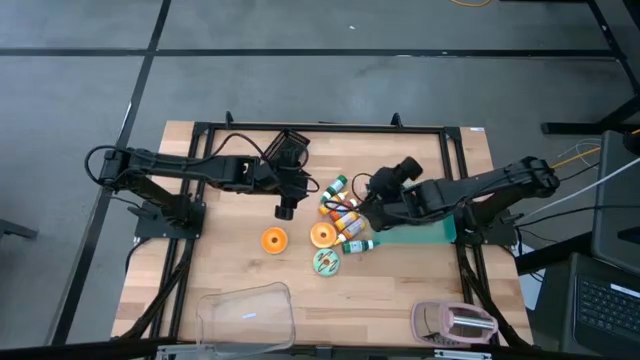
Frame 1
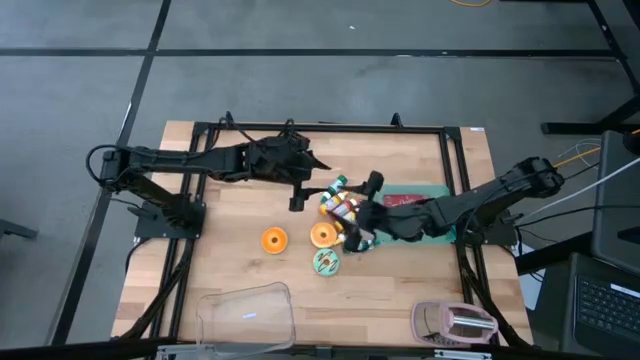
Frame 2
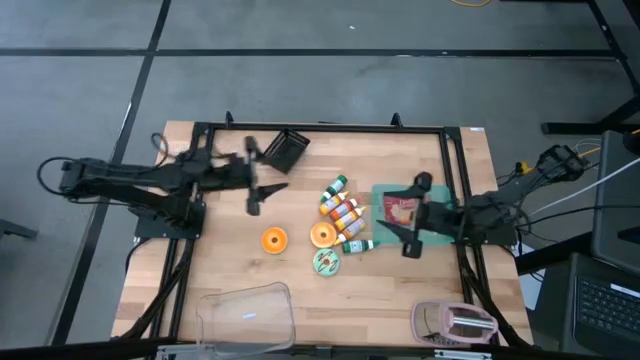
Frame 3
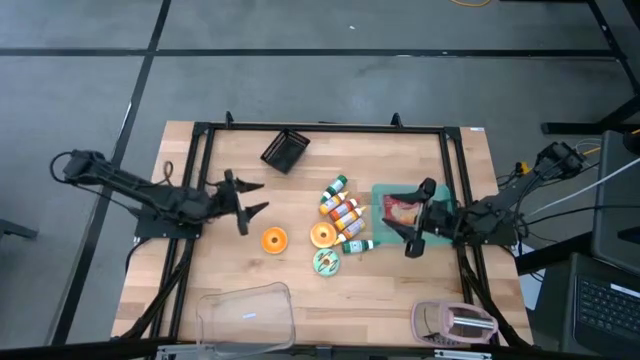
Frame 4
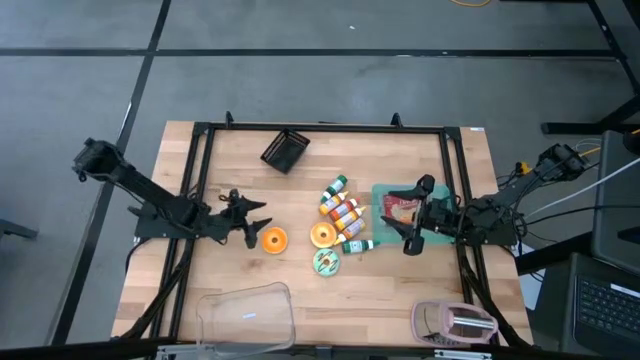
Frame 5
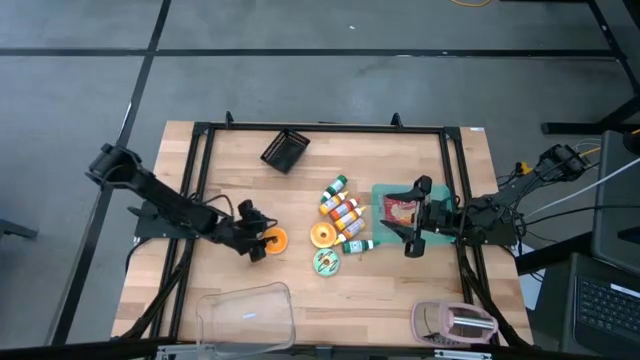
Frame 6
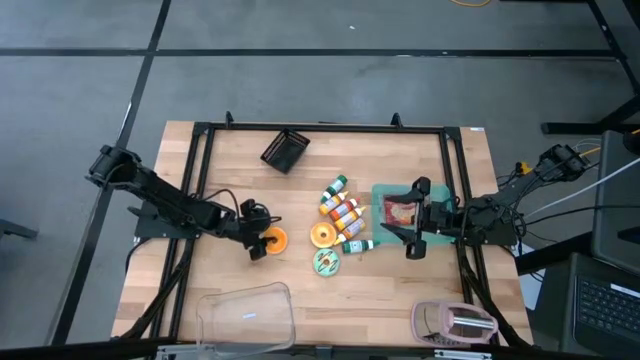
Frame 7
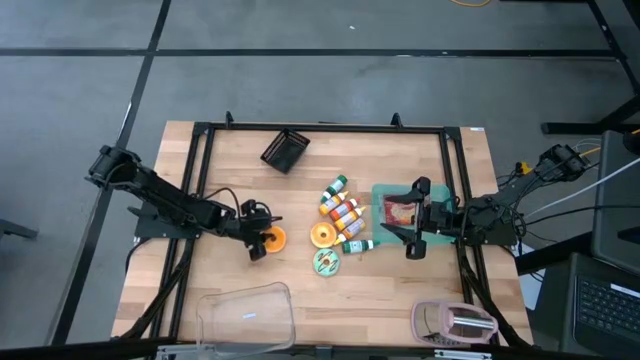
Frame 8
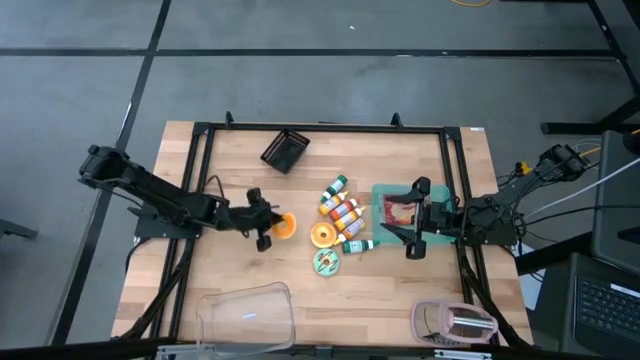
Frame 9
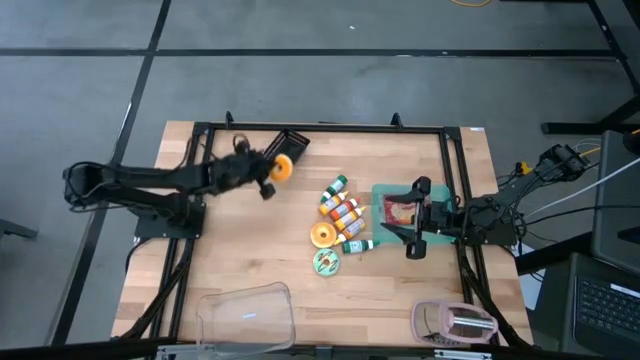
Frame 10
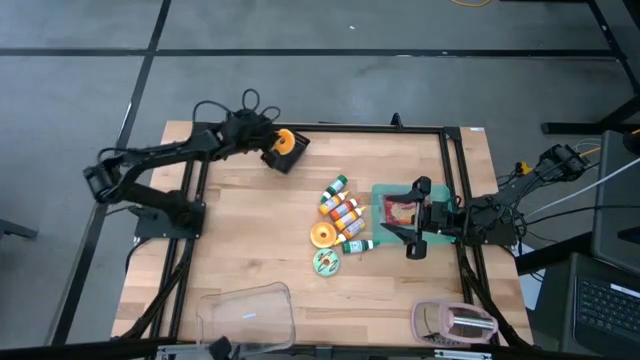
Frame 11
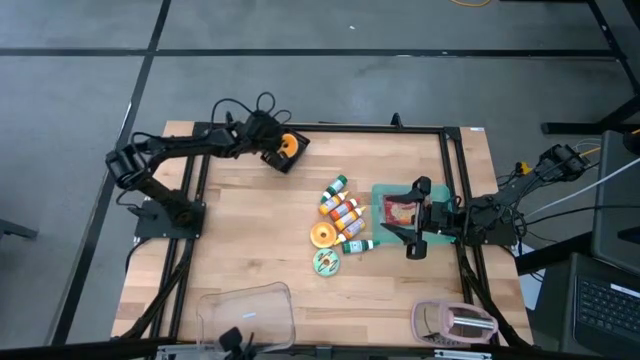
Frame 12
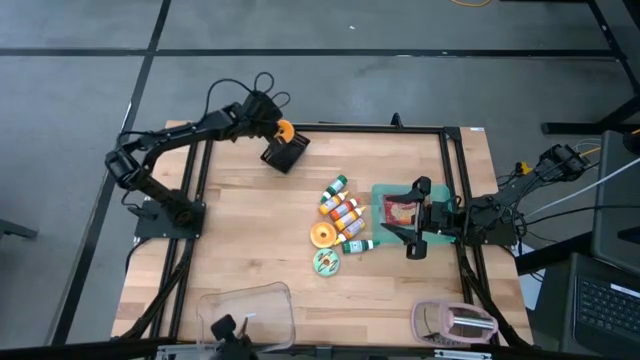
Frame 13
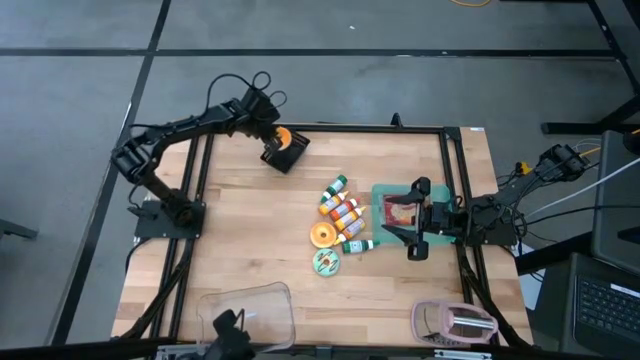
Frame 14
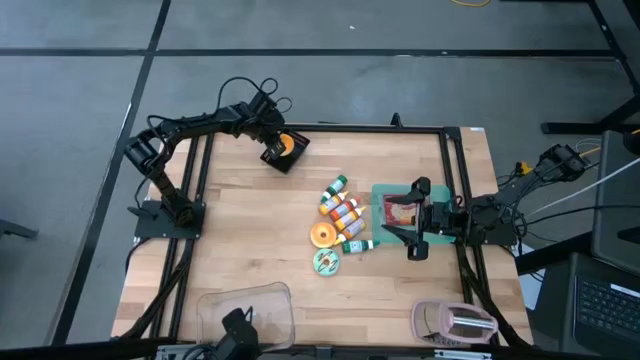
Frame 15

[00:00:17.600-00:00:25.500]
Put the left orange donut into the black bin

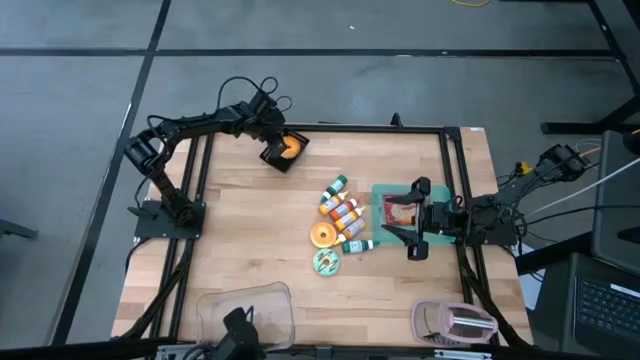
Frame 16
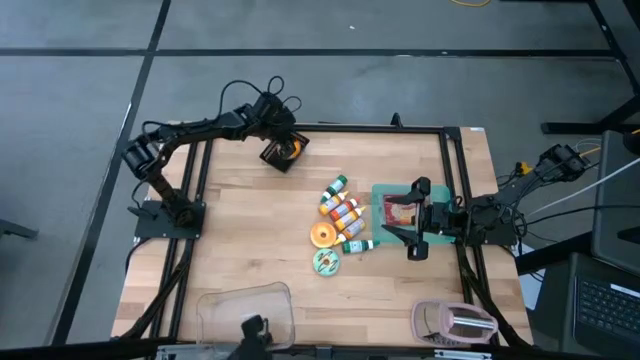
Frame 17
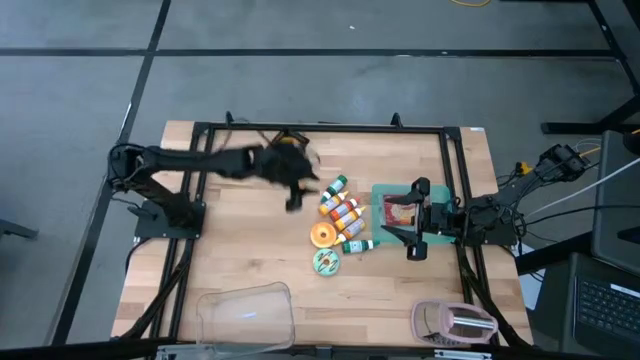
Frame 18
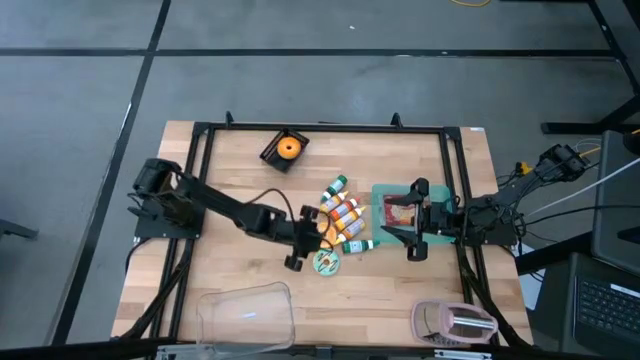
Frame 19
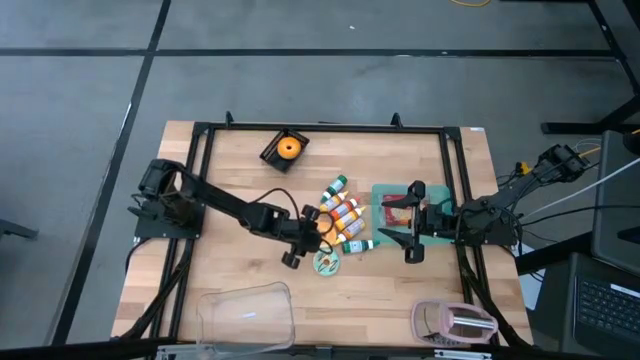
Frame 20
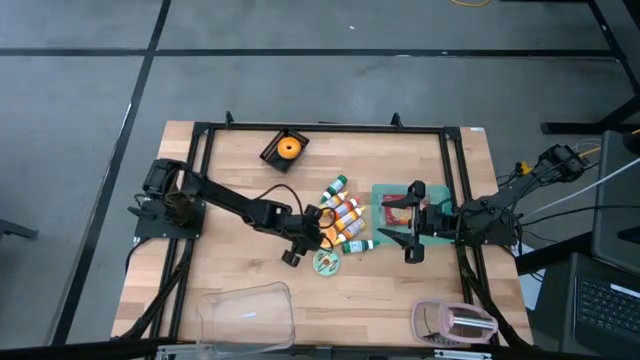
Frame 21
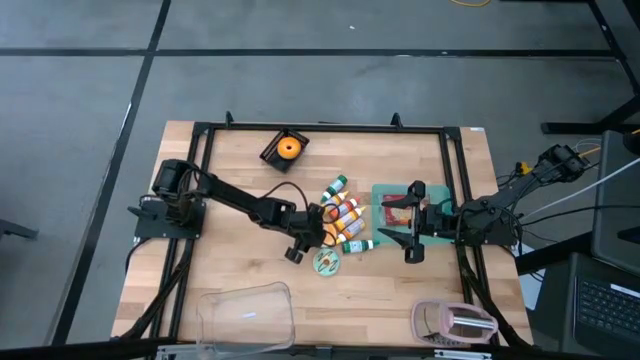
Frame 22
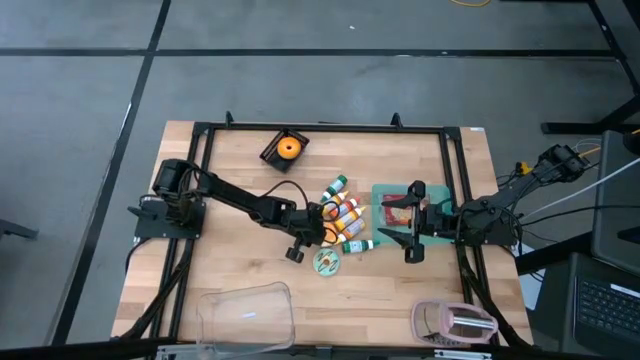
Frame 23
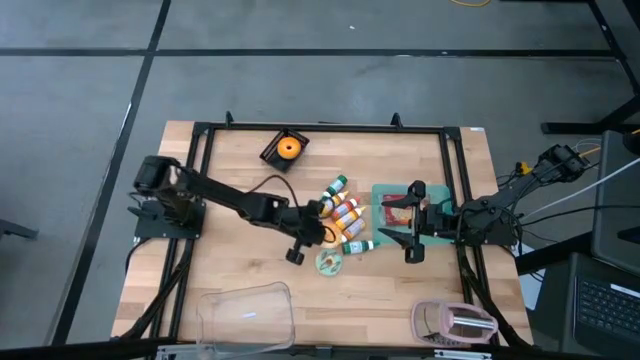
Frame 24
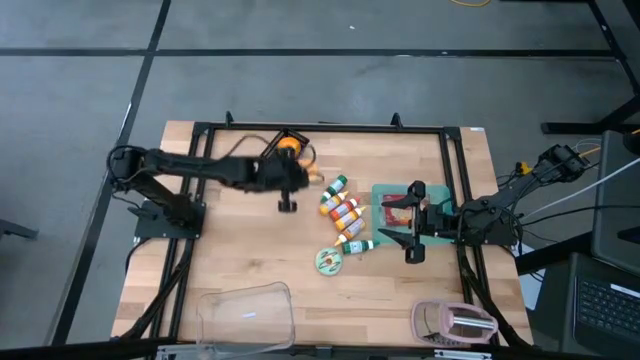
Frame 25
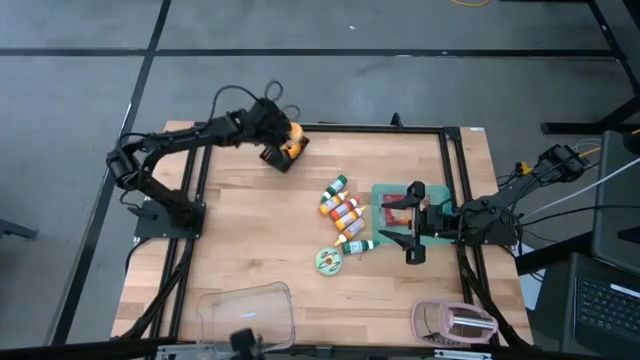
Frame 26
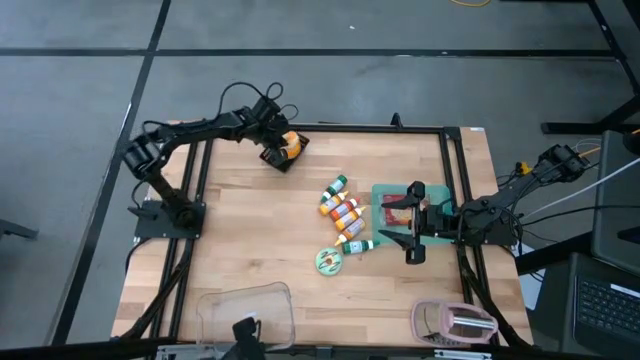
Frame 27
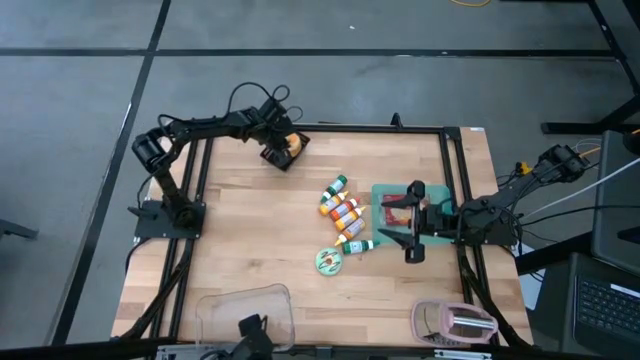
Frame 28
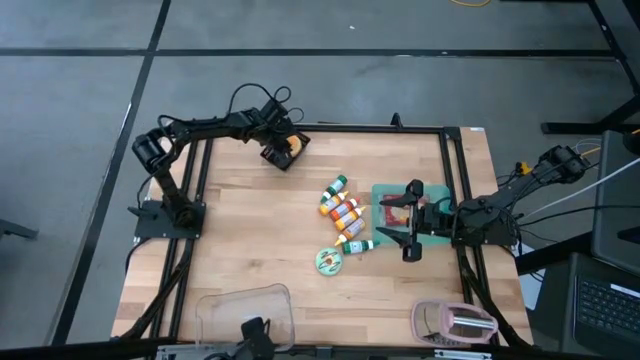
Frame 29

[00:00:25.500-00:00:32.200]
Put the orange donut into the black bin

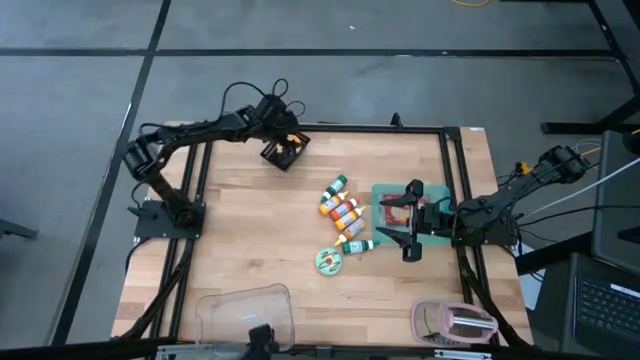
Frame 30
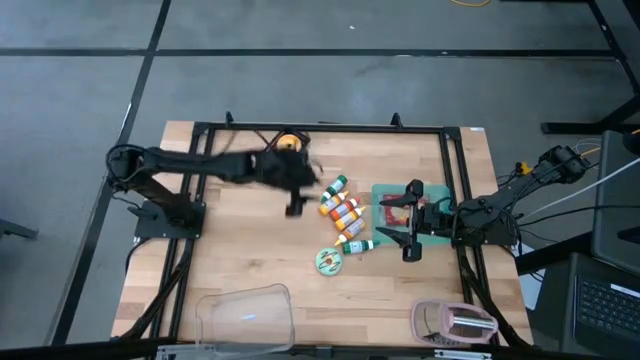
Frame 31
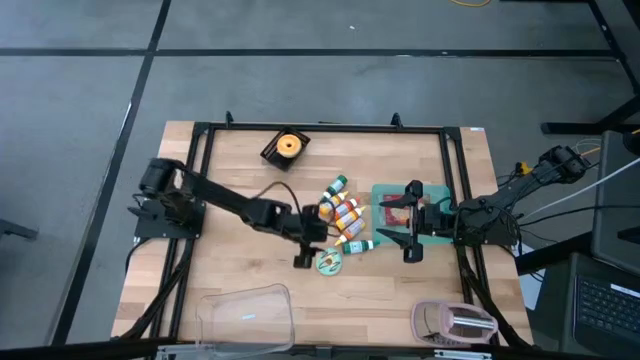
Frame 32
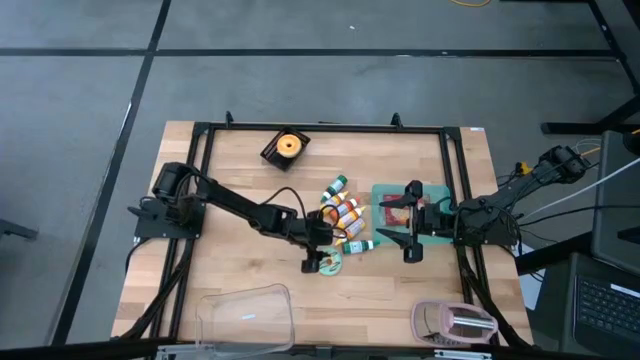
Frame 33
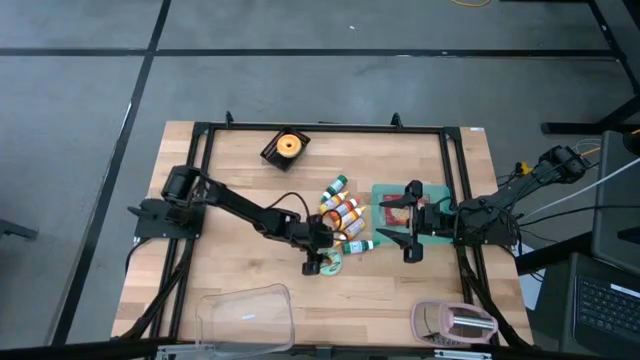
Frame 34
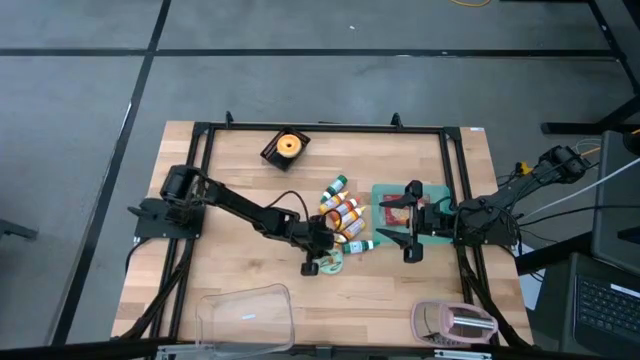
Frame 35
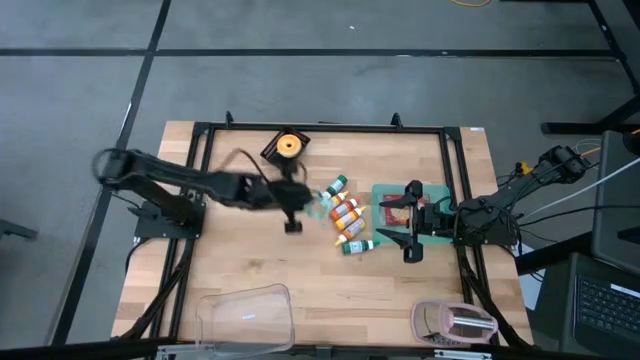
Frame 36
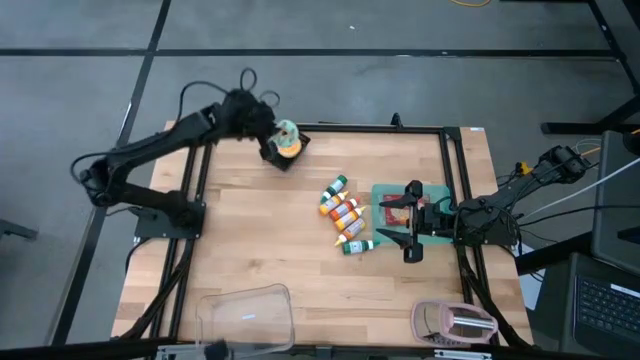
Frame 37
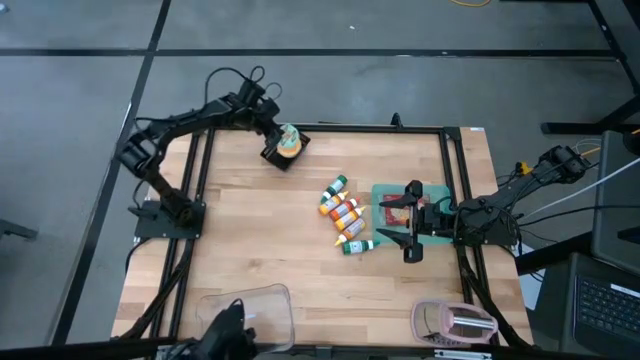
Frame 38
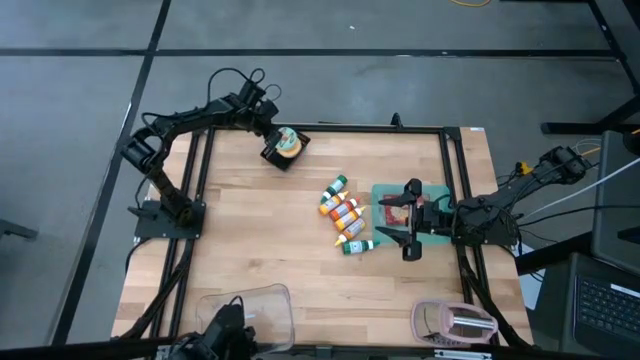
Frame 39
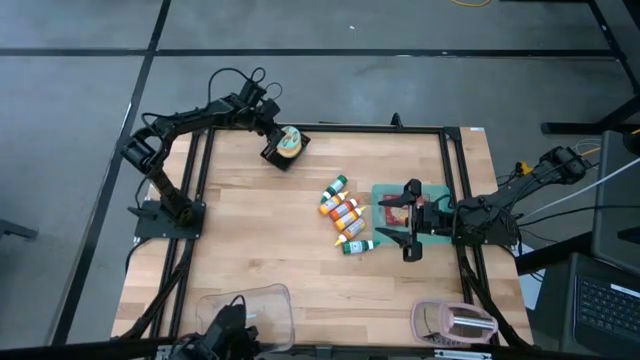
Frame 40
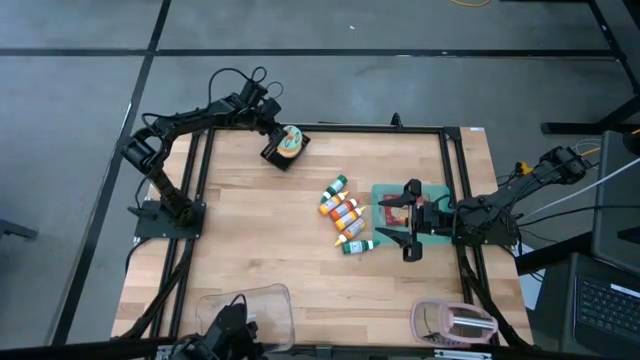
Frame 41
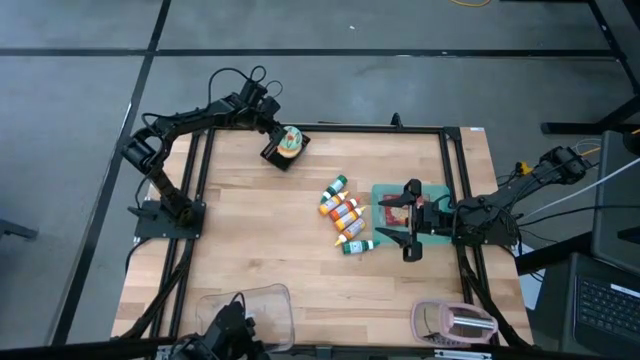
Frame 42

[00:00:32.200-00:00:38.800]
Put the blue donut into the black bin
